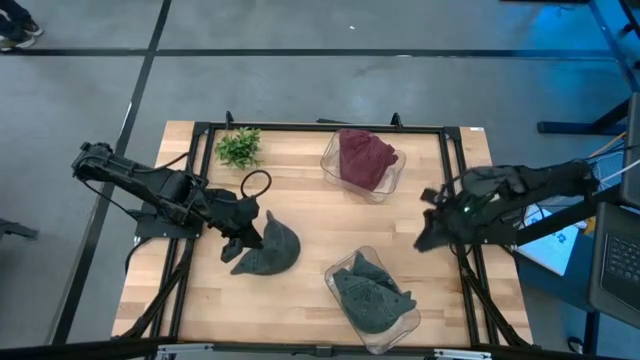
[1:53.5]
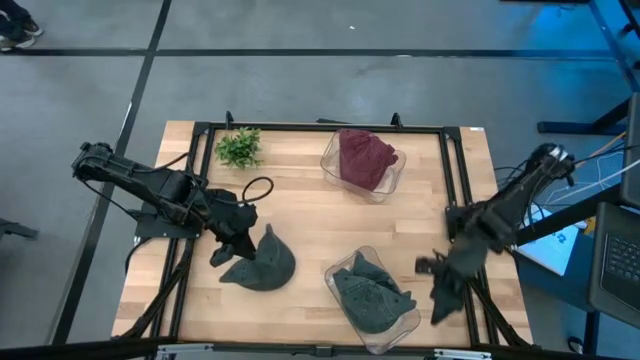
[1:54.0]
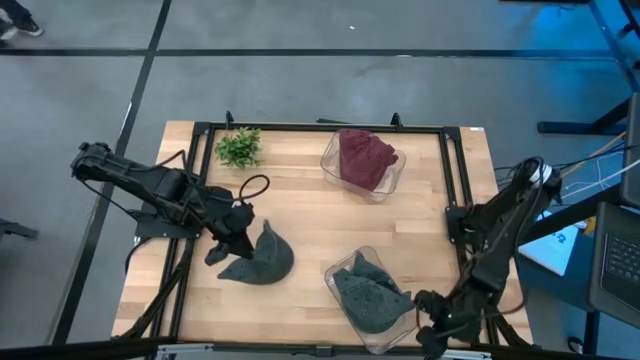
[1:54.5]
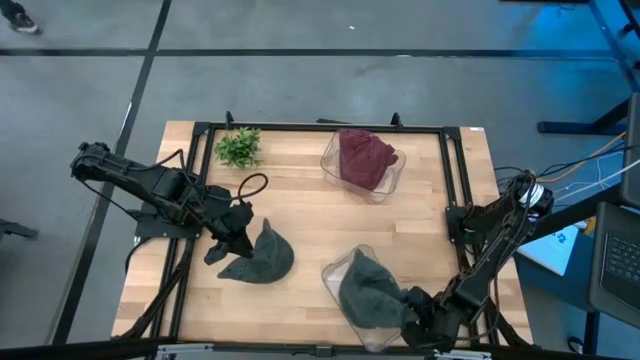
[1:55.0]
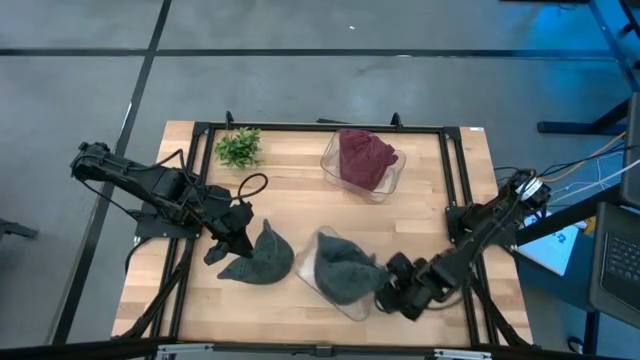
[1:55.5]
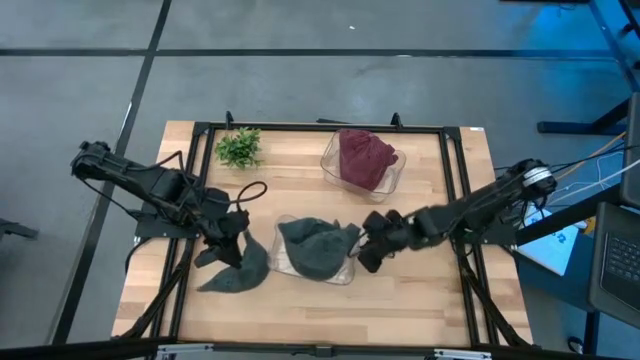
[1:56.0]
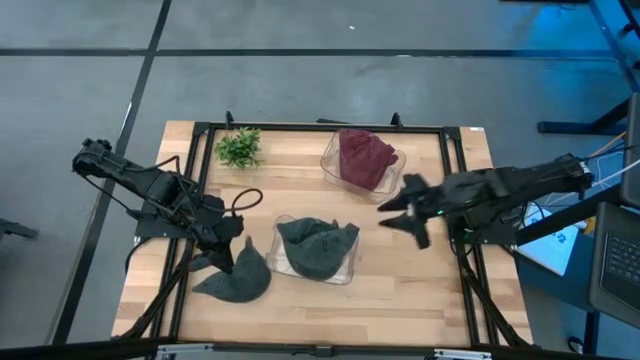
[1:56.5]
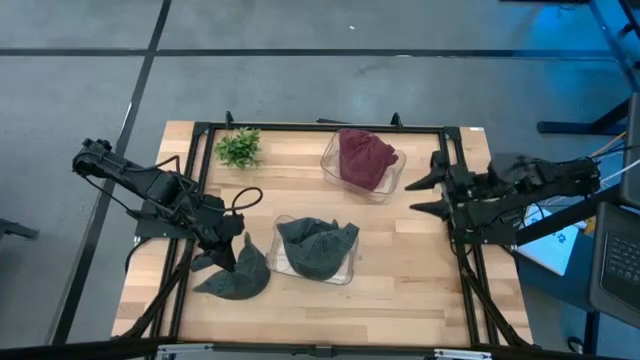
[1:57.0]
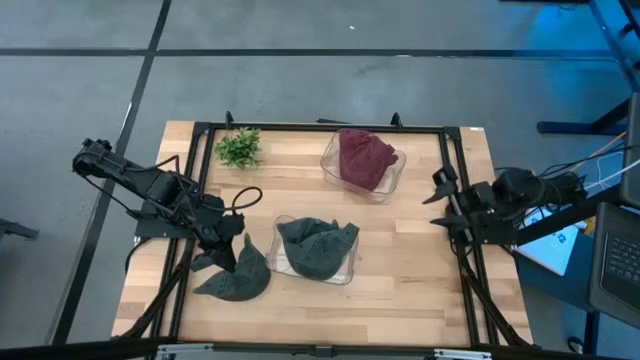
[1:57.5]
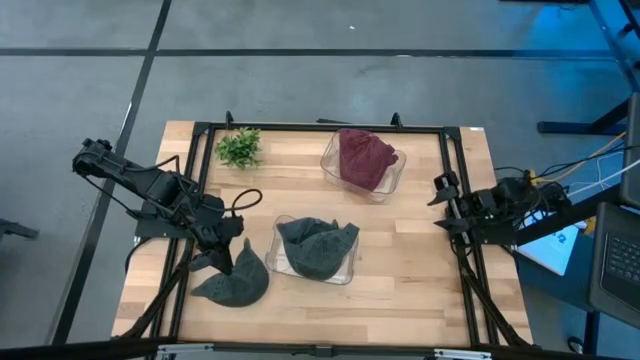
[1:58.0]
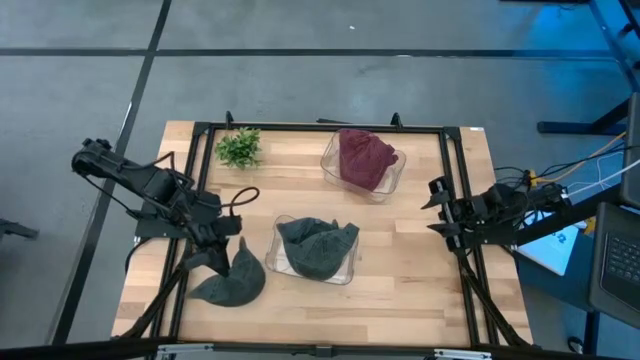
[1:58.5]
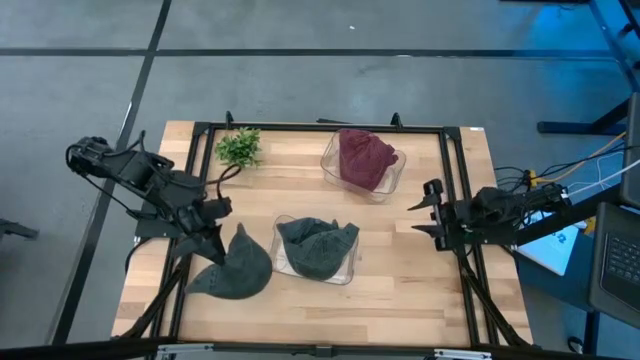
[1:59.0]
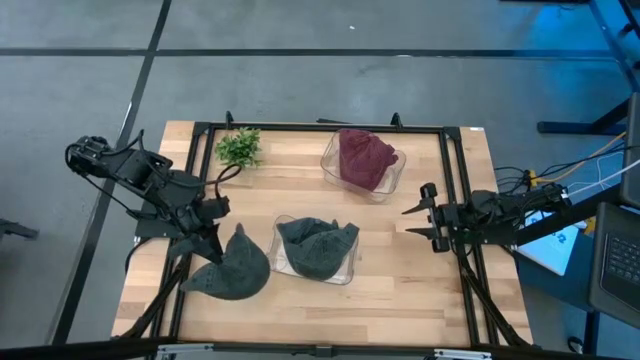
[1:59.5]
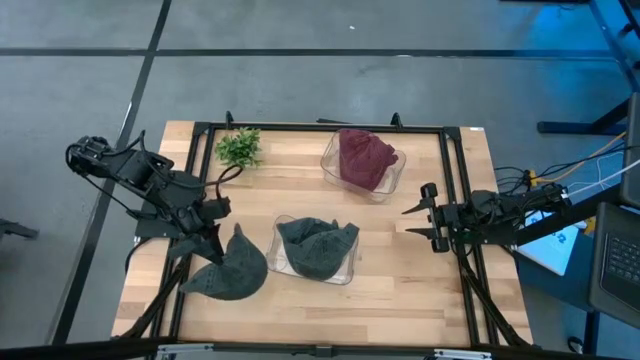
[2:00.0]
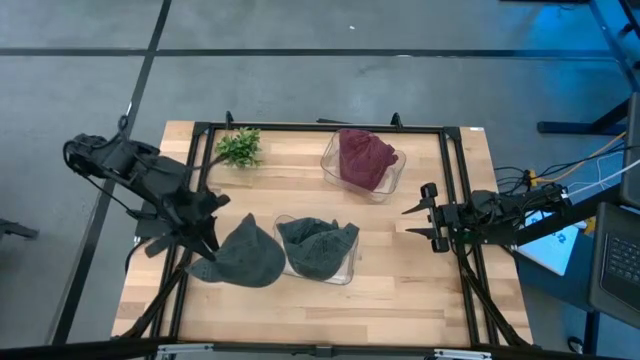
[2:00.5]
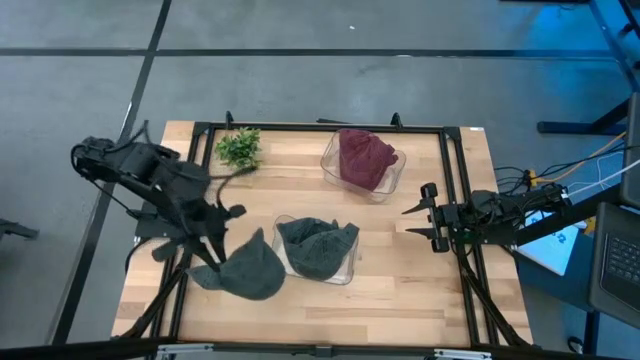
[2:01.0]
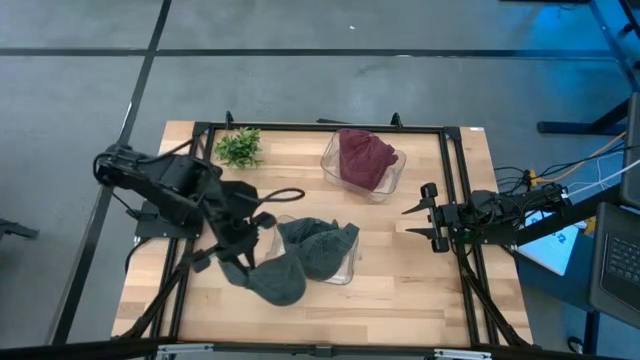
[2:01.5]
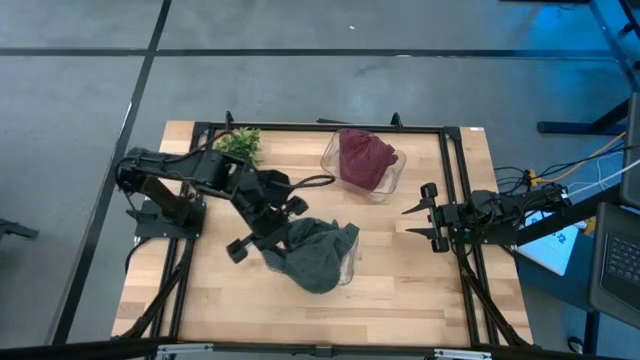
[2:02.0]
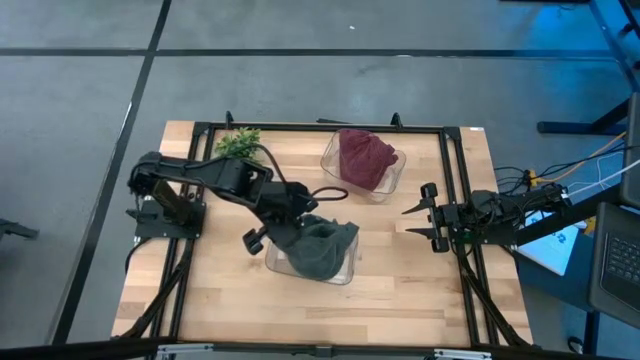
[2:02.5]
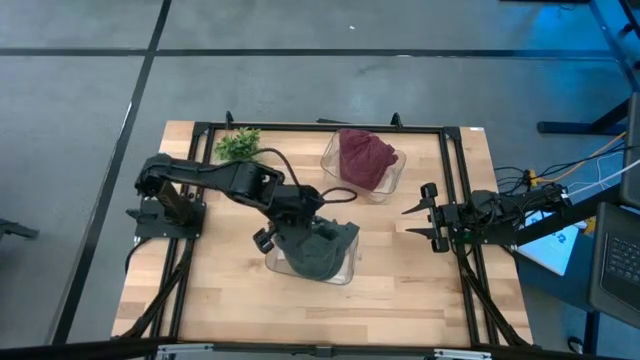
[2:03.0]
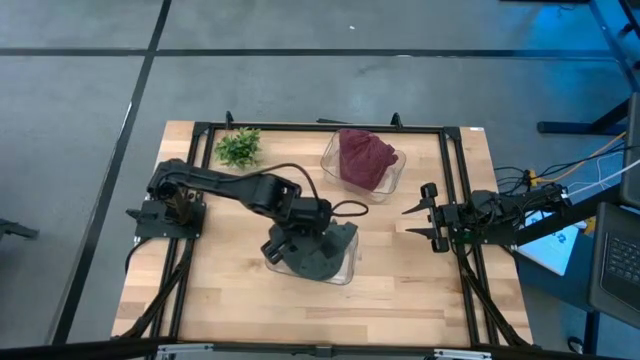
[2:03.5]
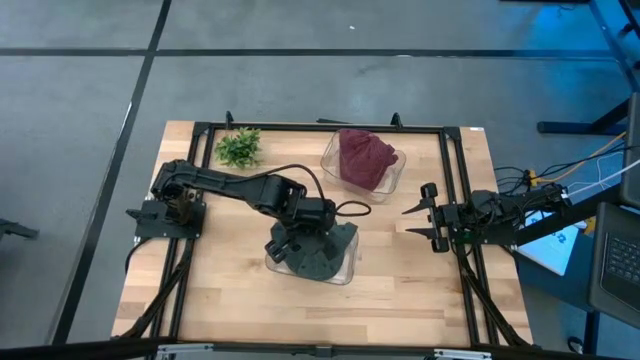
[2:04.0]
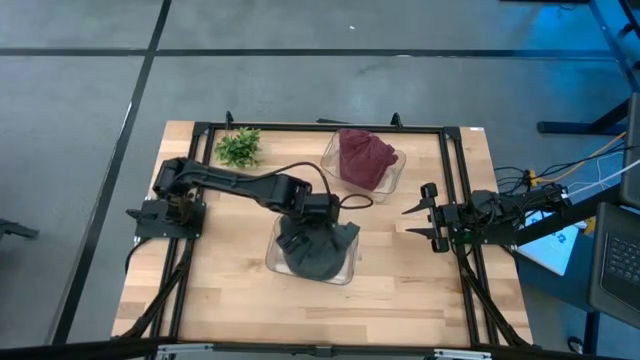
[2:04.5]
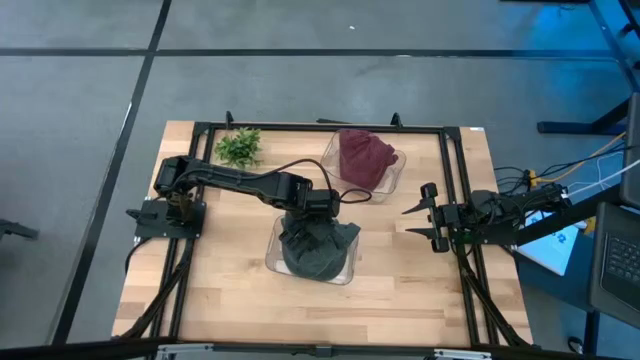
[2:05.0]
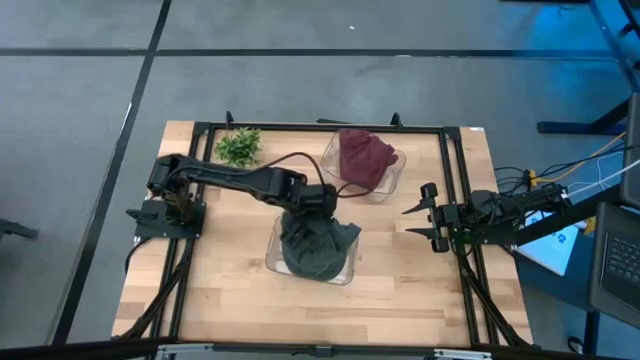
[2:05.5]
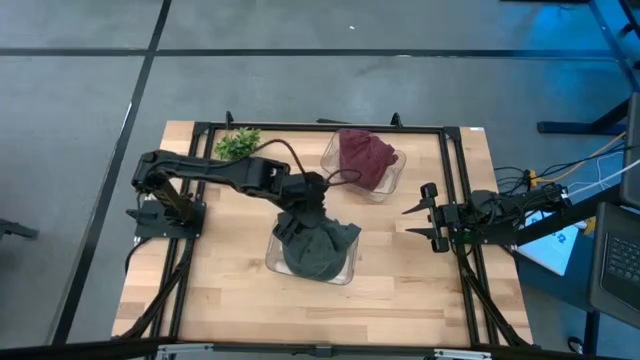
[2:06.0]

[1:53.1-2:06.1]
Task: Pick & Place hat
Put the black cap into the bottom transparent bin

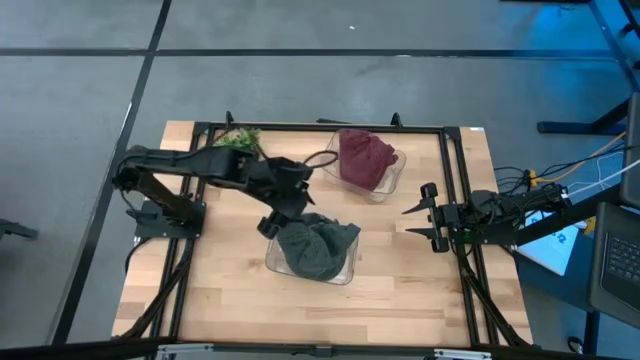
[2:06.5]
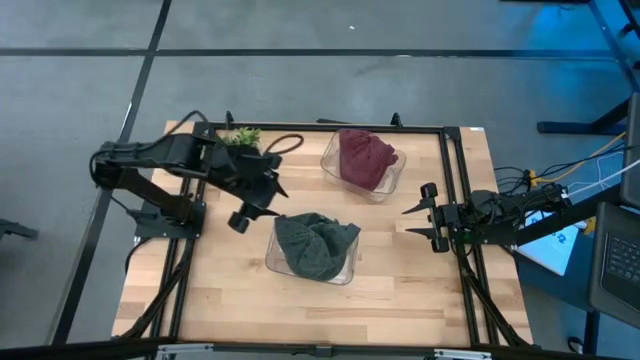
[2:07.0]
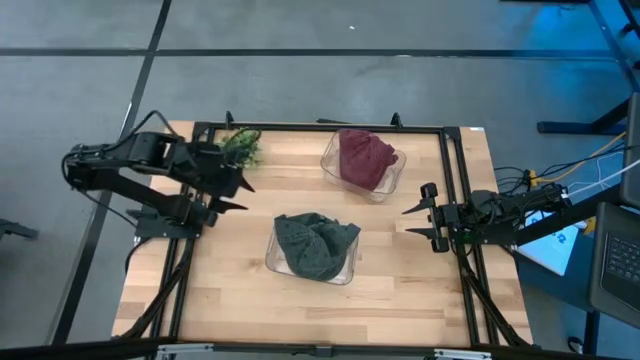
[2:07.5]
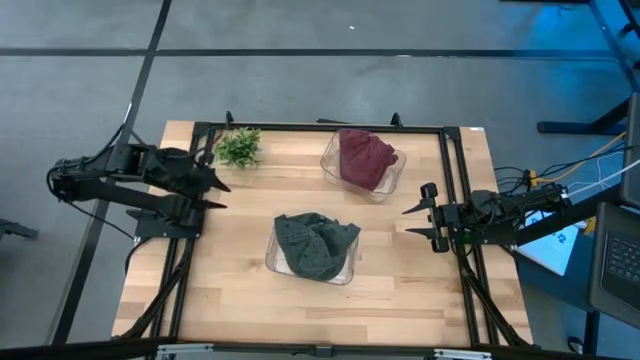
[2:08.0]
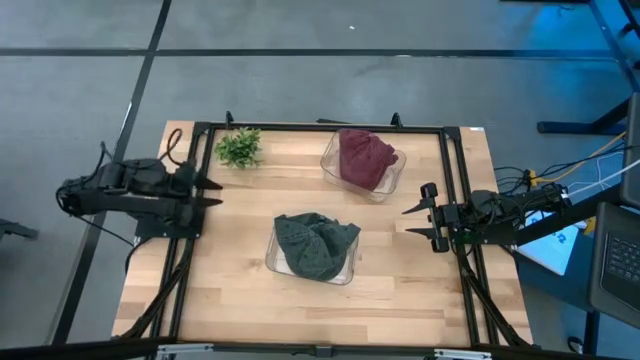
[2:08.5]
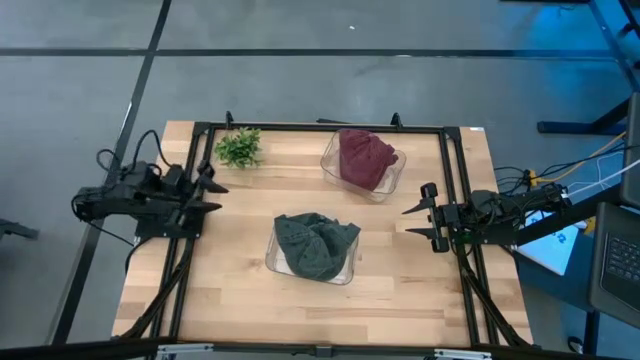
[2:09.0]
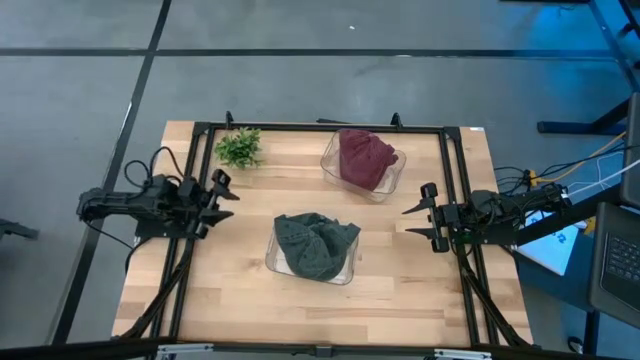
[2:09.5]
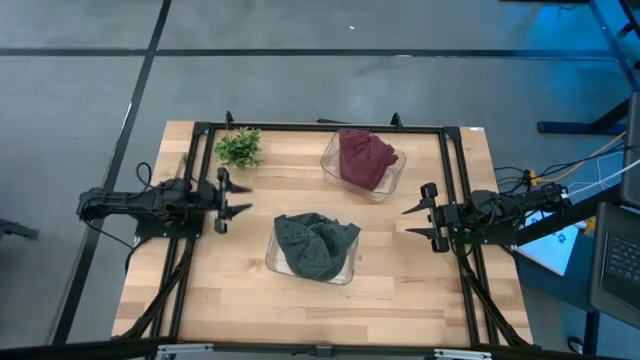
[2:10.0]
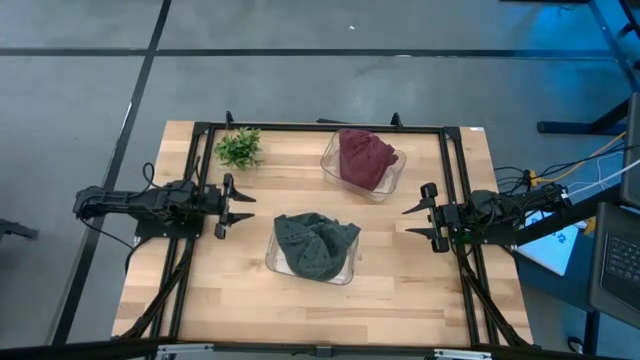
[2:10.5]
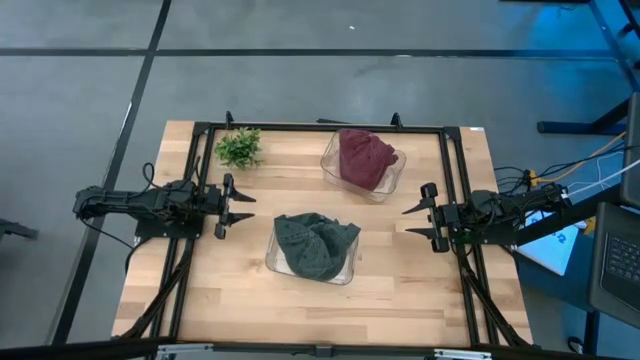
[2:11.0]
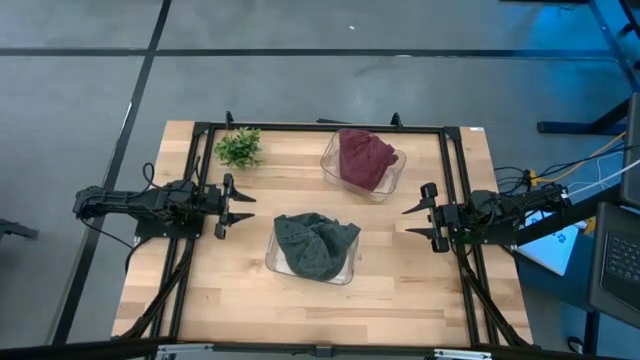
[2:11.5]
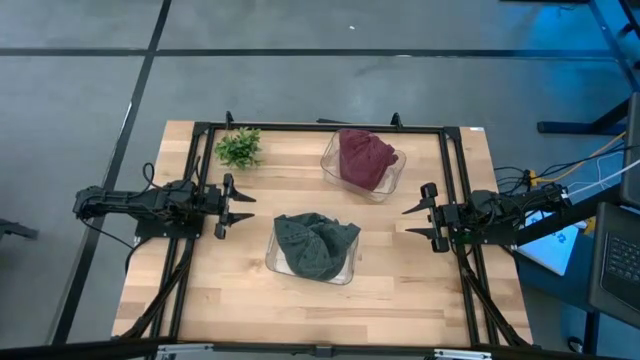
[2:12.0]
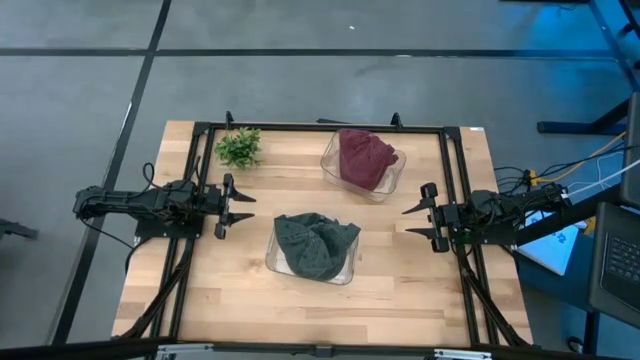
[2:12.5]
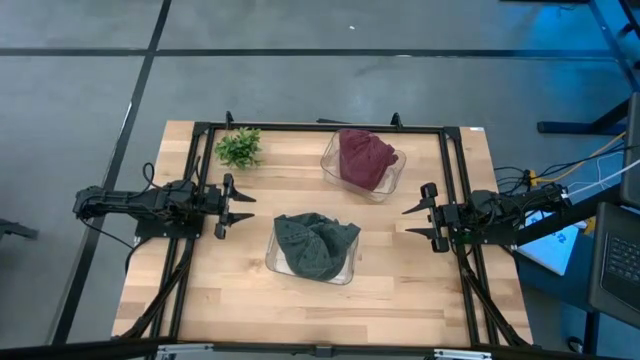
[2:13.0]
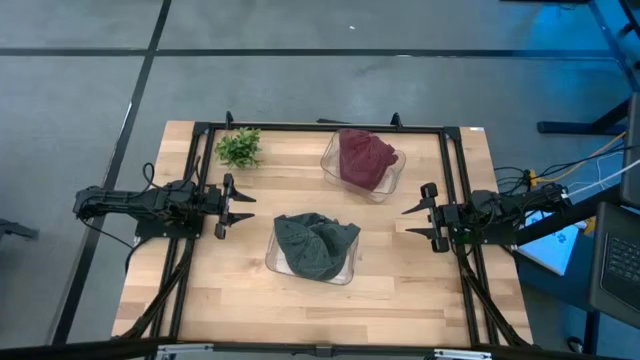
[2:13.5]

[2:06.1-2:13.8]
Return to Home Position

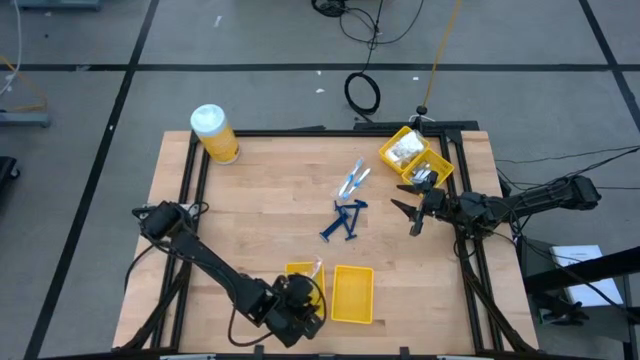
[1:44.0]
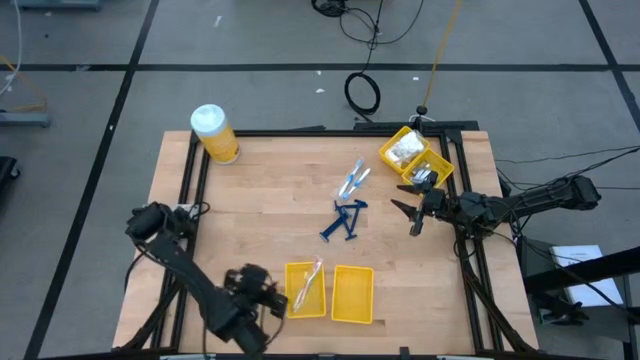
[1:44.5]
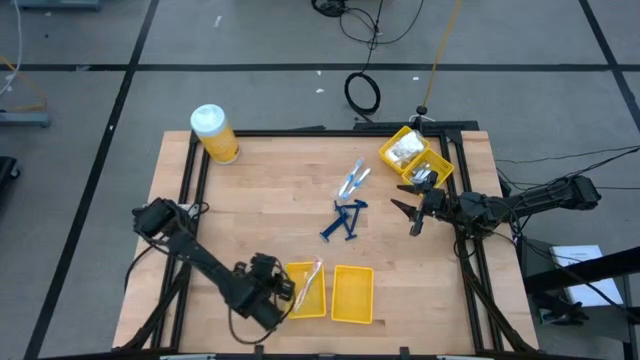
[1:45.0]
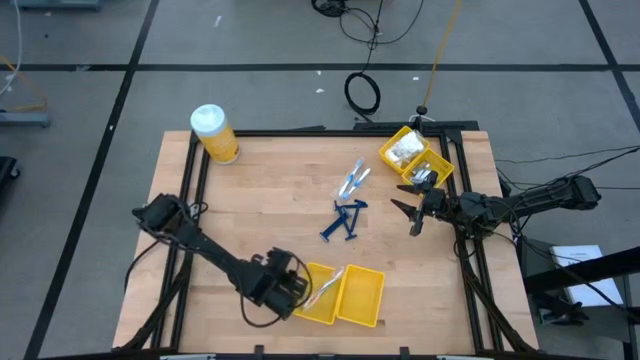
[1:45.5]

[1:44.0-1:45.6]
Task: Pick & Place Travel size toiletries
Adjust the bottom left yellow bin
